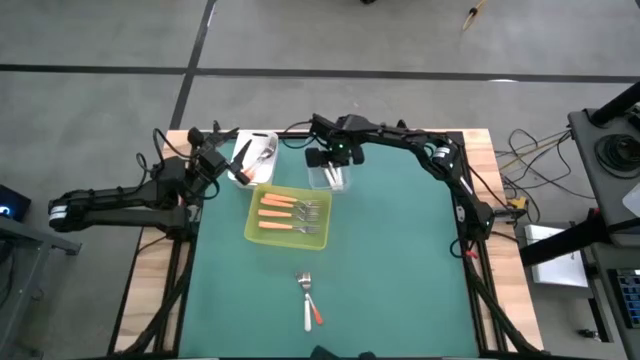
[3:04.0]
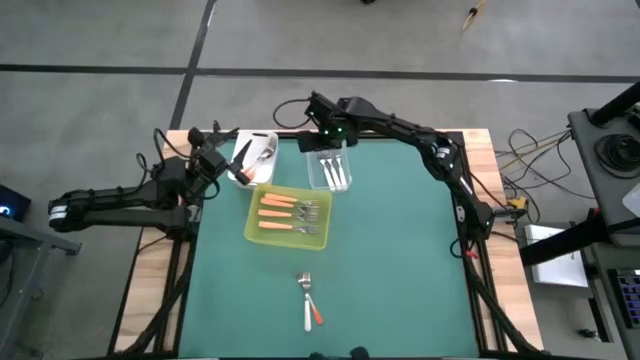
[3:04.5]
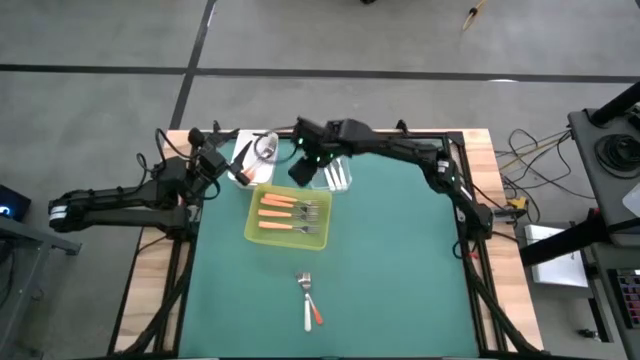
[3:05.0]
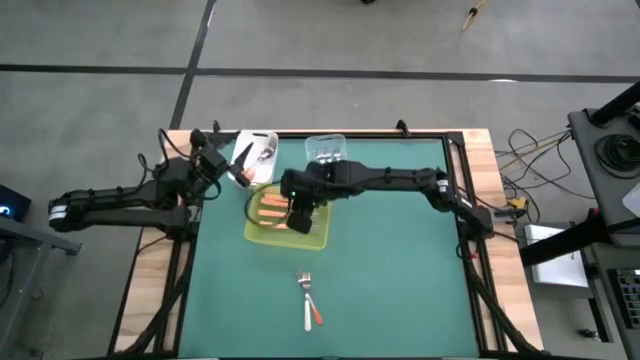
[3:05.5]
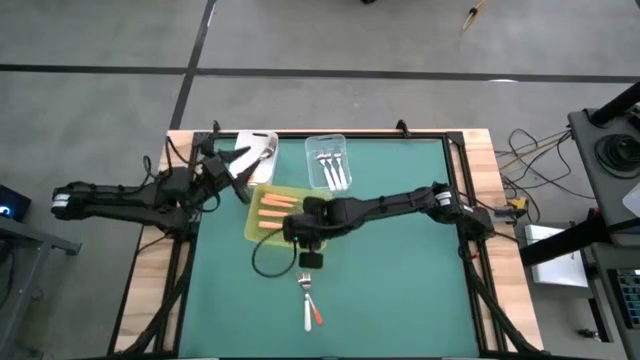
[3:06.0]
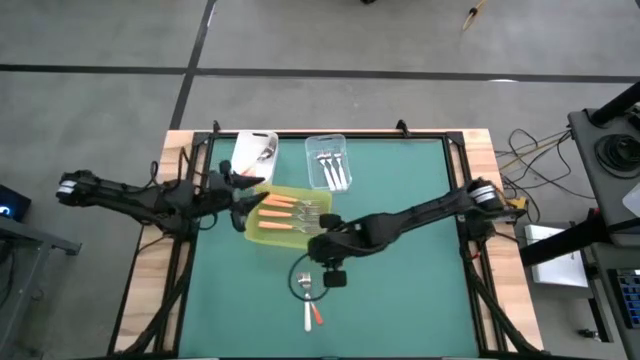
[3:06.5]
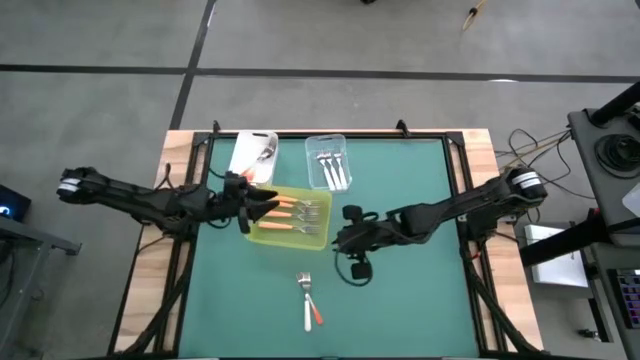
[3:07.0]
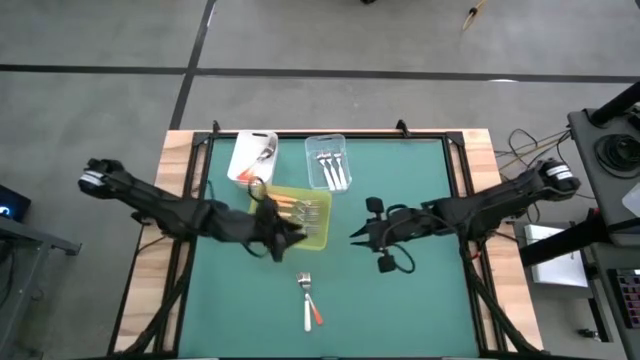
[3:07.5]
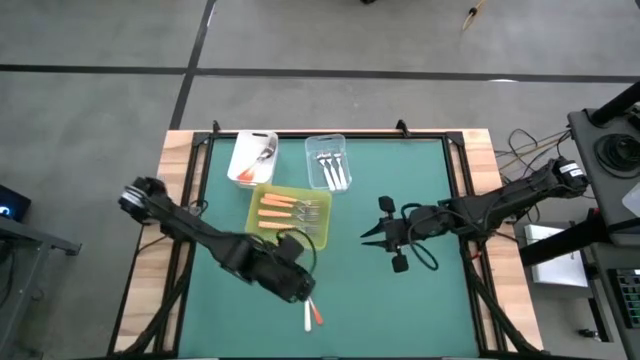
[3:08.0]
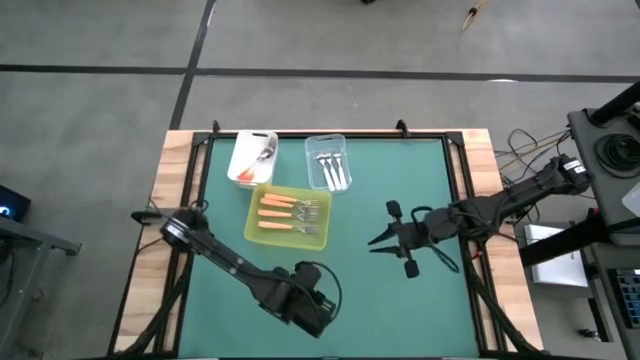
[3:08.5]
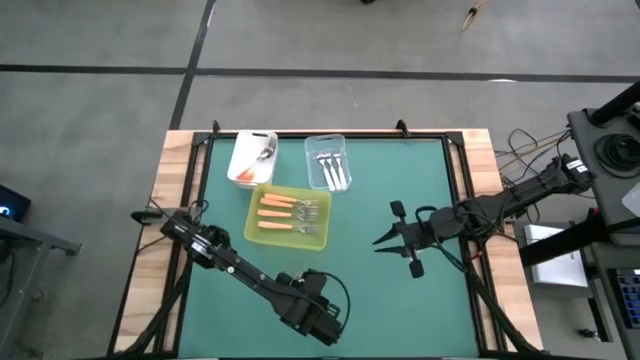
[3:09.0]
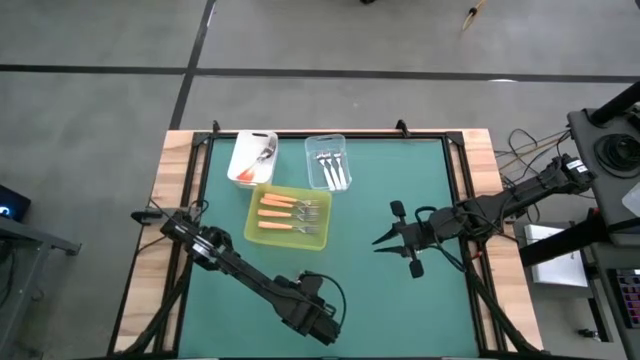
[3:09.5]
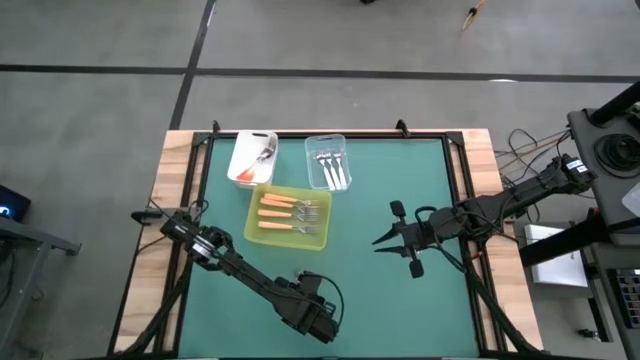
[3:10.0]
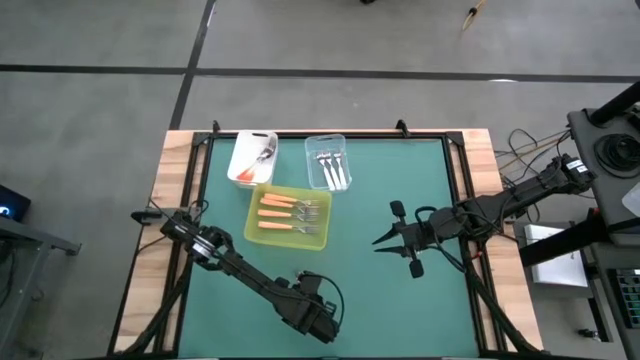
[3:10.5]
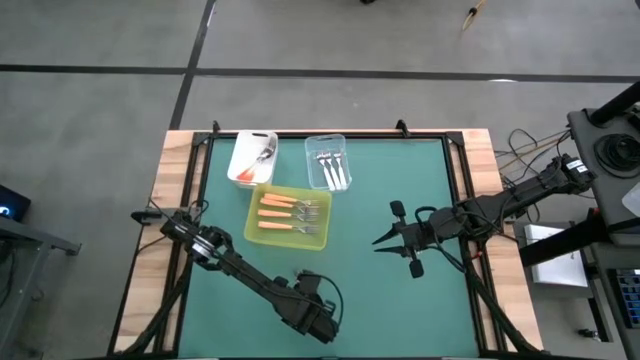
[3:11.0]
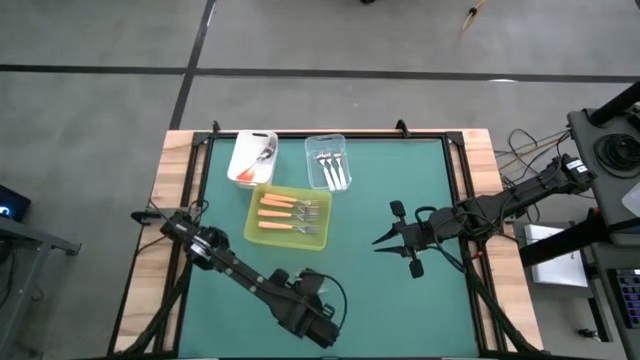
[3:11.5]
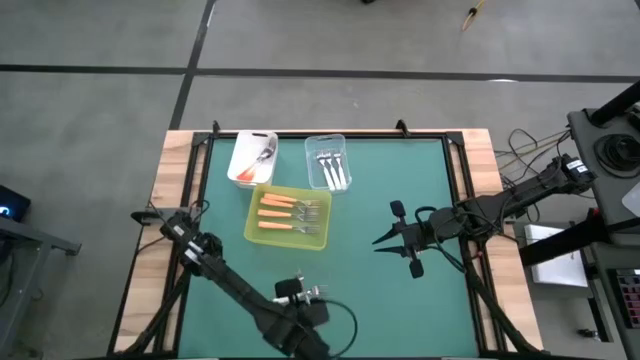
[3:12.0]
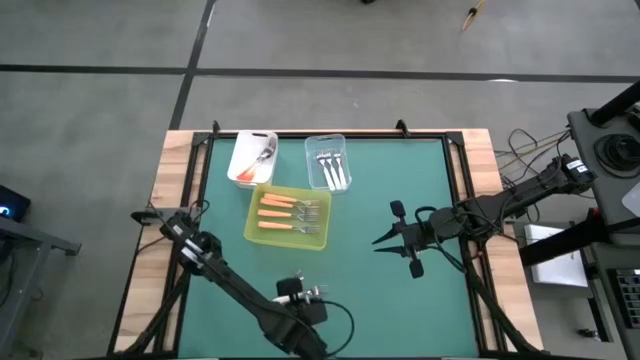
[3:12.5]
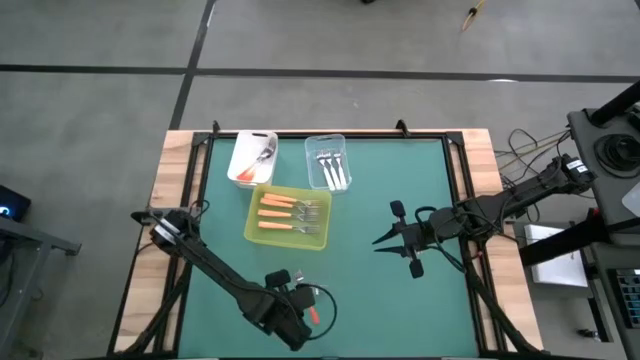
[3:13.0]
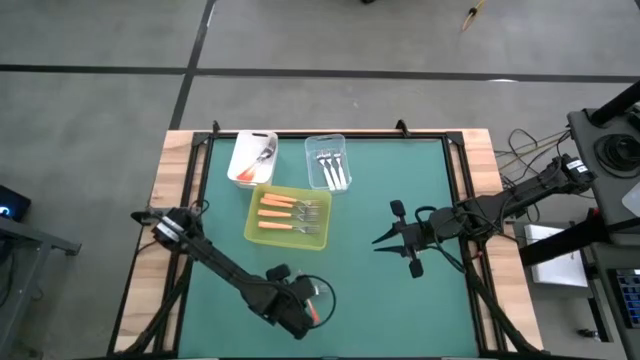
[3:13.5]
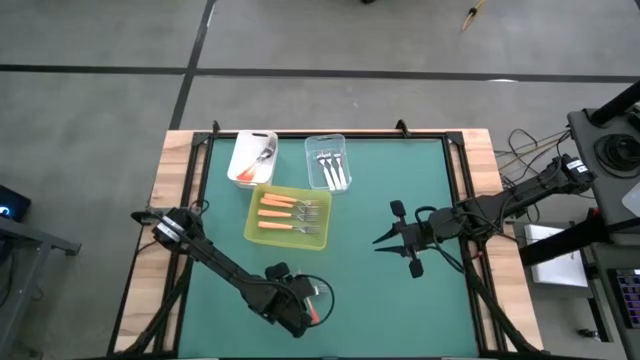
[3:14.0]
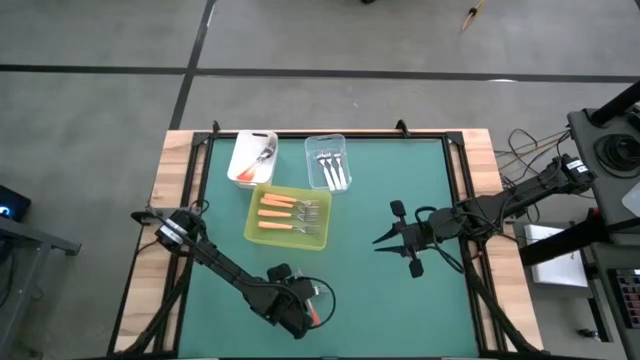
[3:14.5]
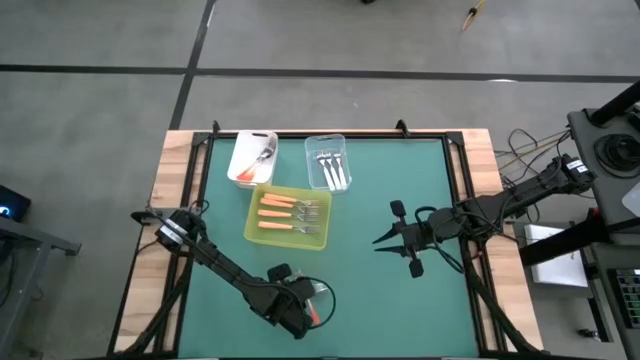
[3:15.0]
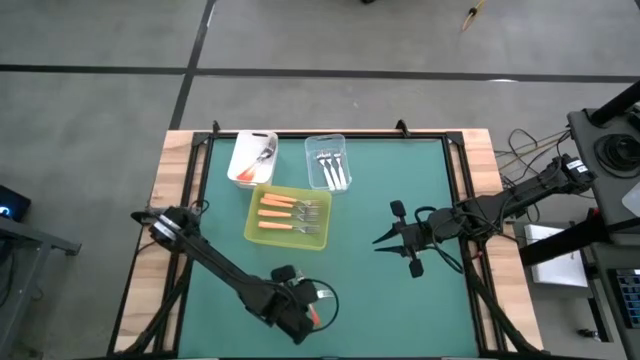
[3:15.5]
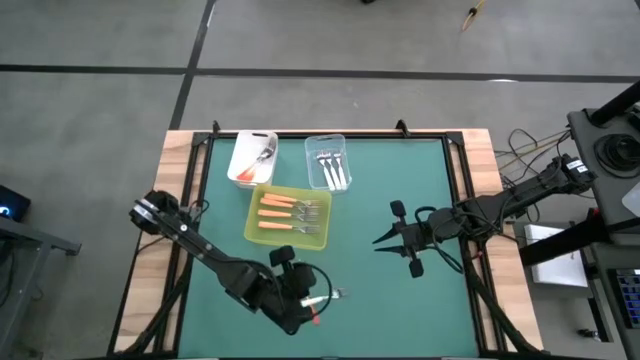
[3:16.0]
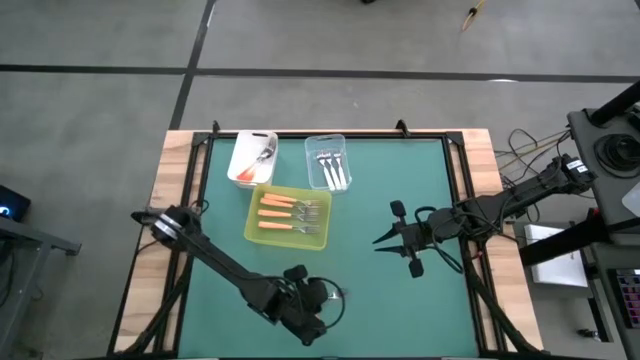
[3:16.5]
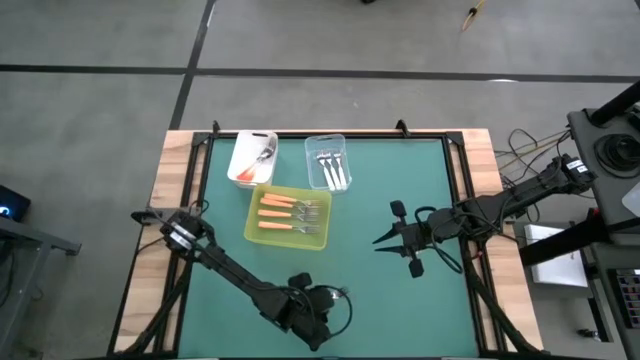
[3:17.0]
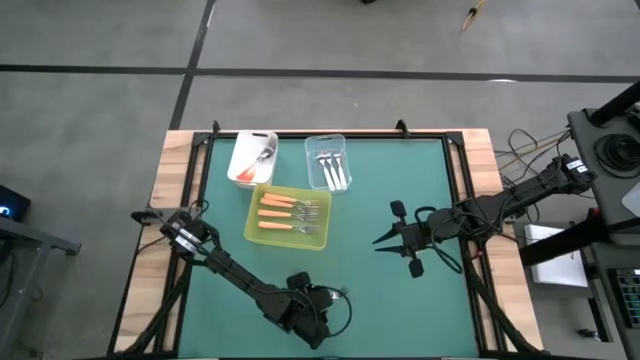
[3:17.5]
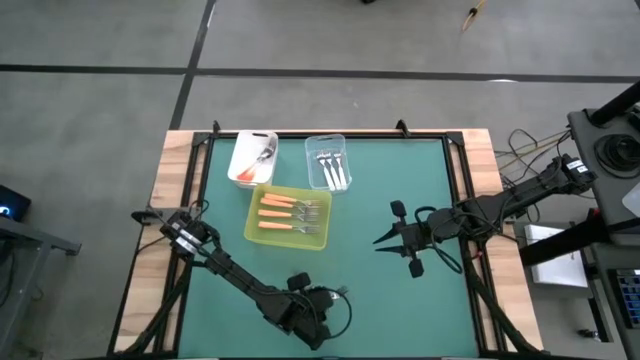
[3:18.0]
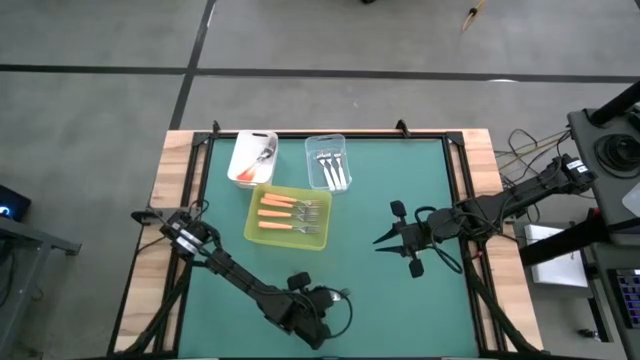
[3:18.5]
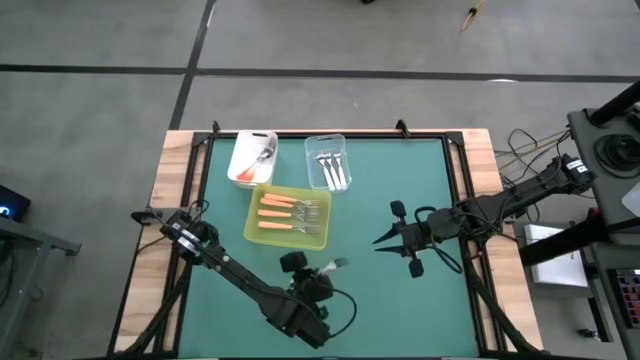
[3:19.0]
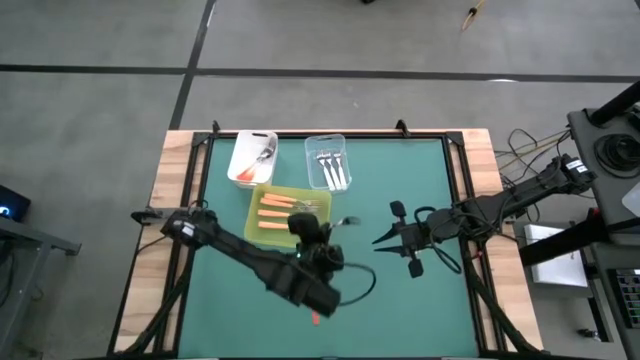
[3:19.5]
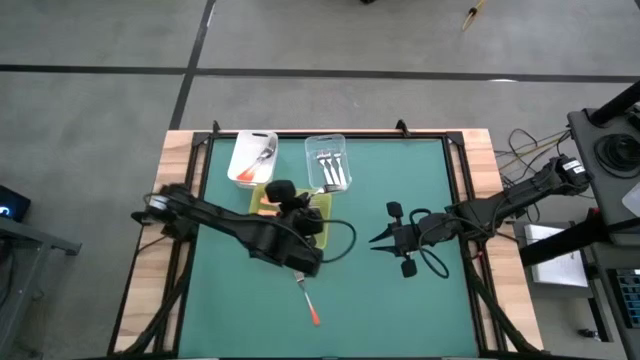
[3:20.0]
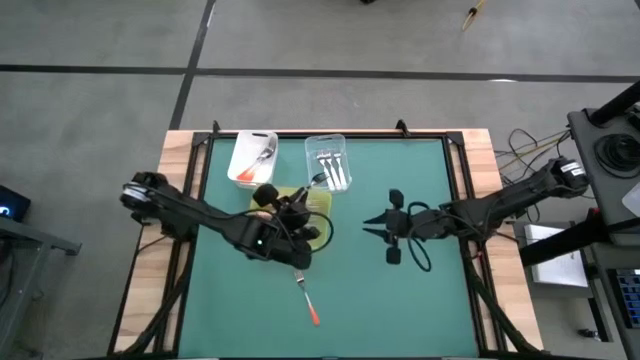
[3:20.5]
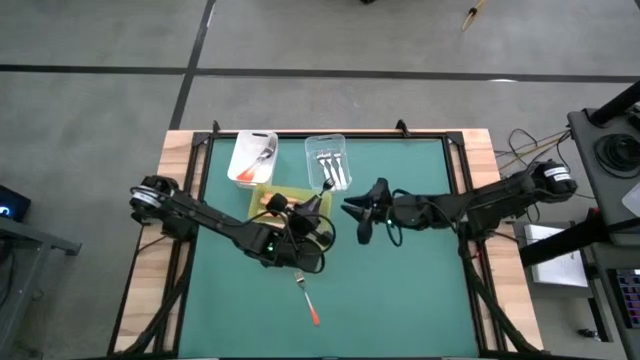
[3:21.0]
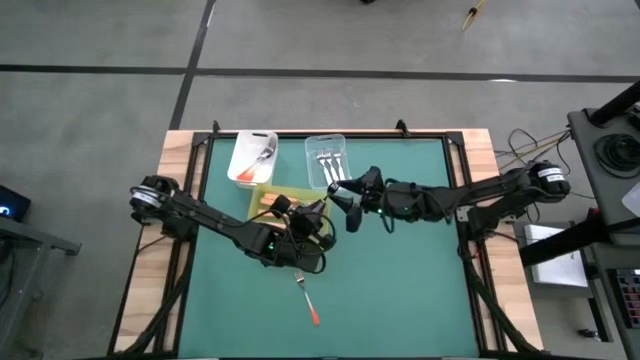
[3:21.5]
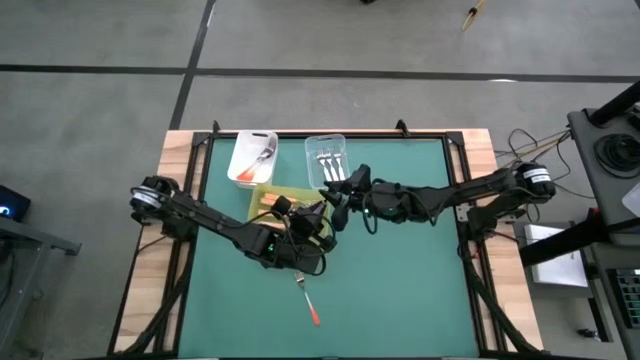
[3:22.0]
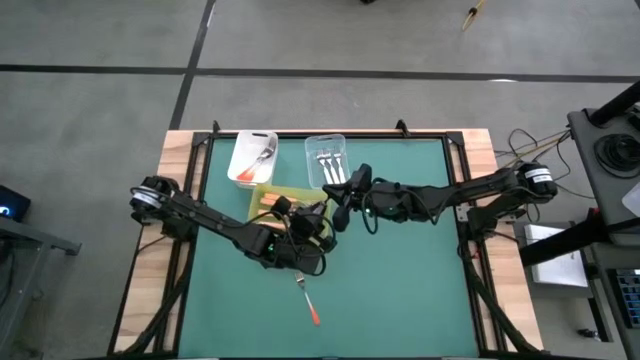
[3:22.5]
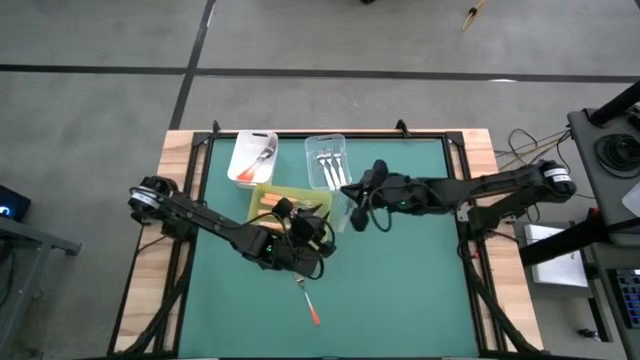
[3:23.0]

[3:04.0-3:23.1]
Task: Sort silverware by color (type)
Put the white fork into the transparent bin

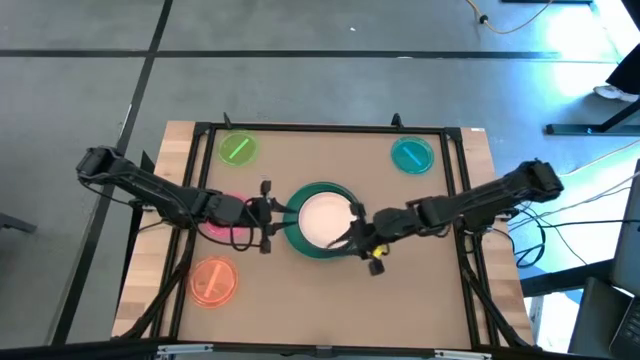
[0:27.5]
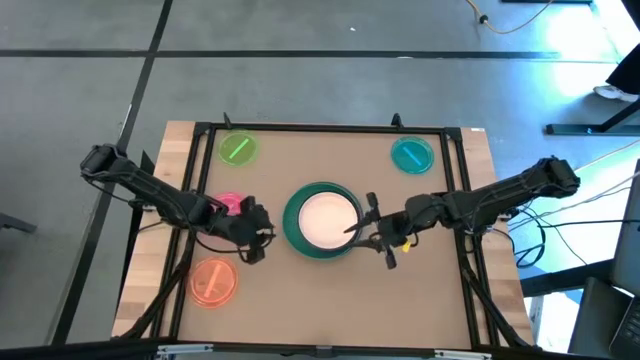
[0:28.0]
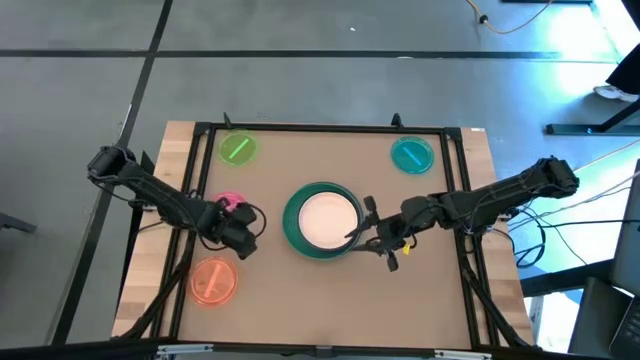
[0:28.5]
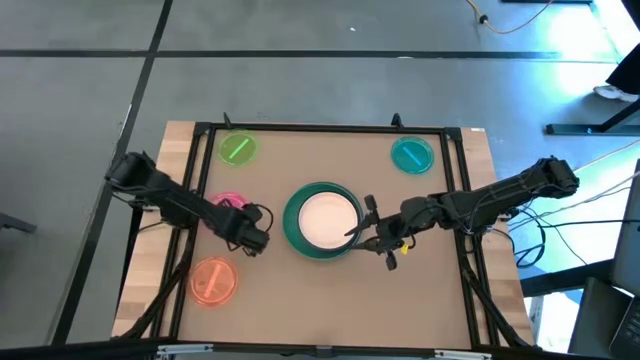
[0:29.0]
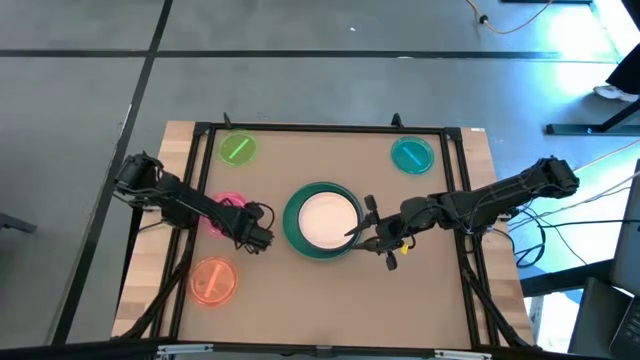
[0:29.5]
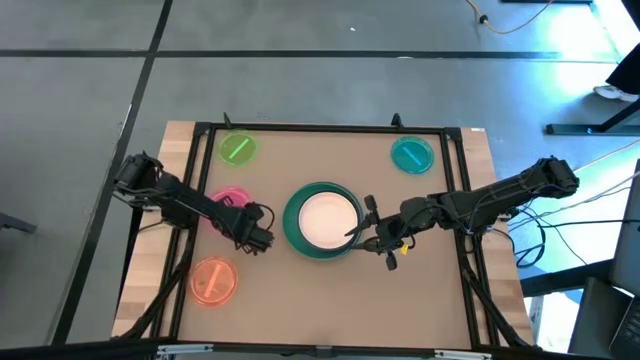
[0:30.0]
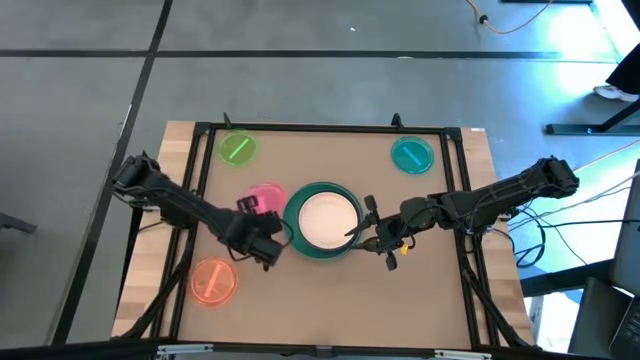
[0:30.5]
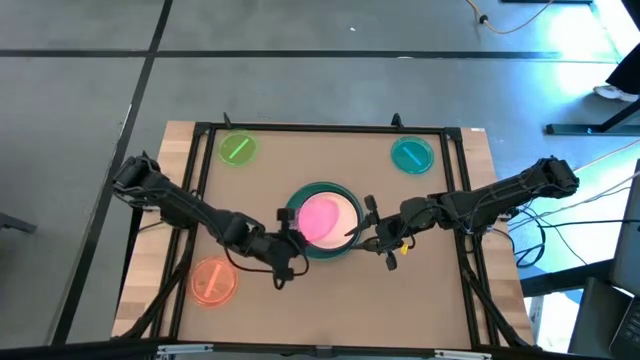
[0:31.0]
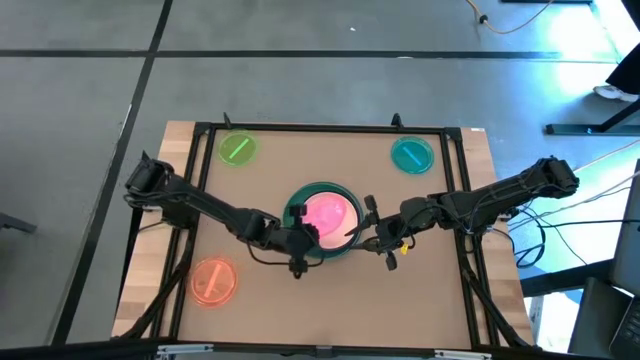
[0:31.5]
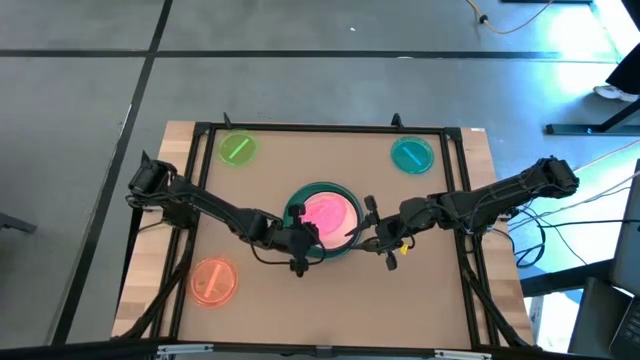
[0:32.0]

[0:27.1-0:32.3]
Task: Stack plastic plates
Stack the transparent pink plate on top of the light orange plate
